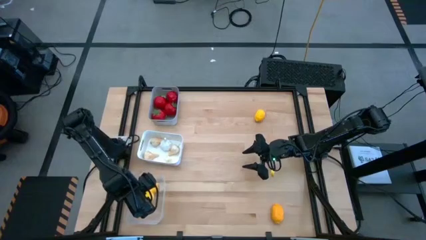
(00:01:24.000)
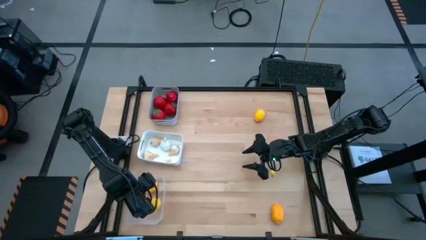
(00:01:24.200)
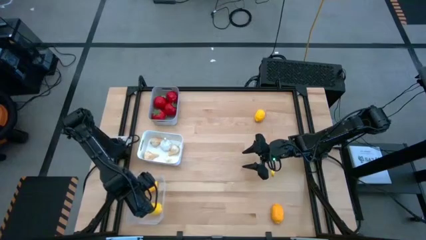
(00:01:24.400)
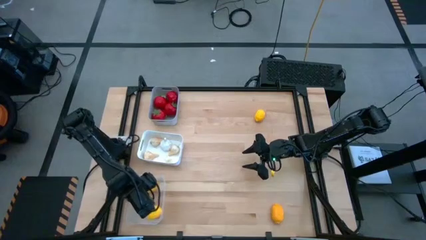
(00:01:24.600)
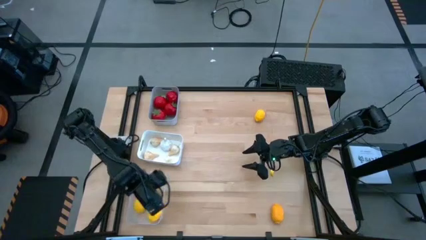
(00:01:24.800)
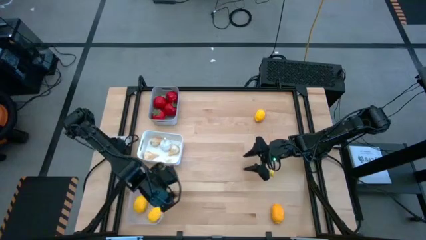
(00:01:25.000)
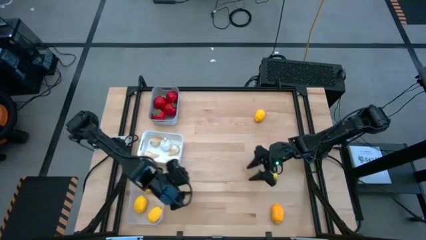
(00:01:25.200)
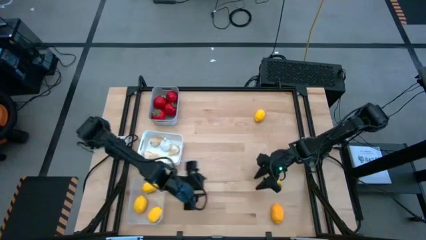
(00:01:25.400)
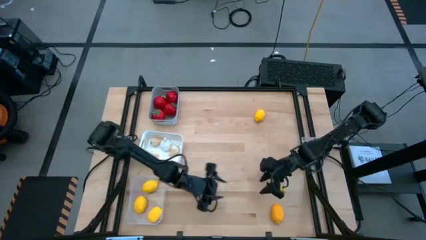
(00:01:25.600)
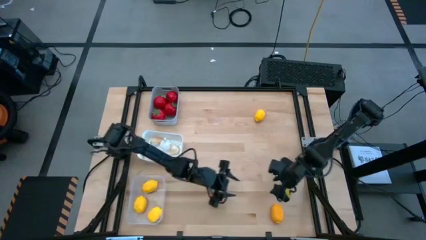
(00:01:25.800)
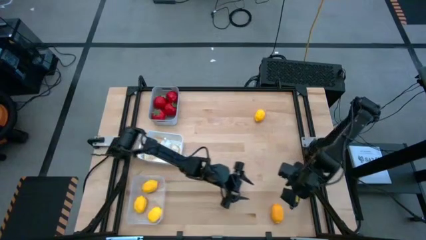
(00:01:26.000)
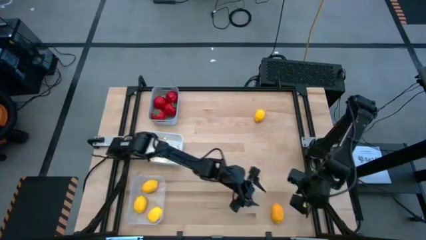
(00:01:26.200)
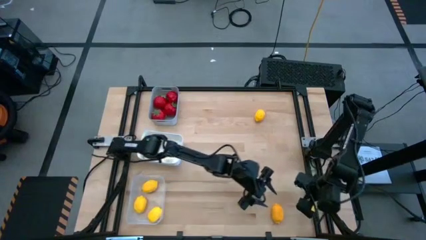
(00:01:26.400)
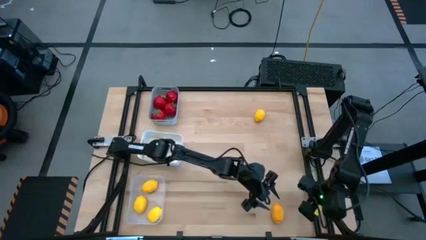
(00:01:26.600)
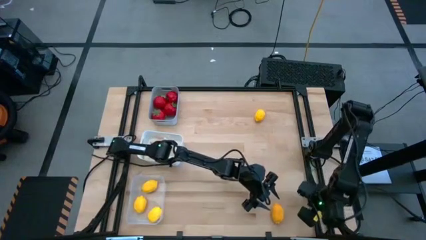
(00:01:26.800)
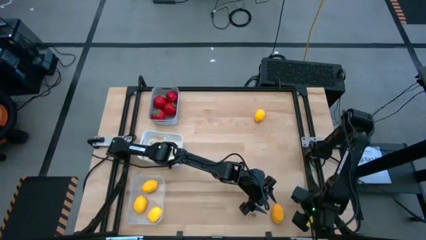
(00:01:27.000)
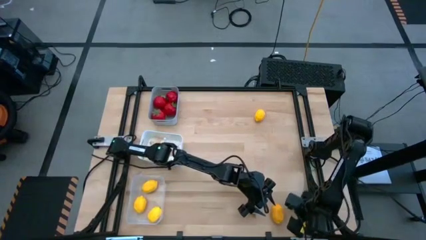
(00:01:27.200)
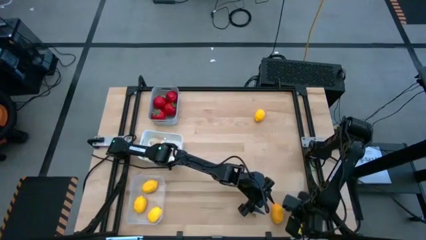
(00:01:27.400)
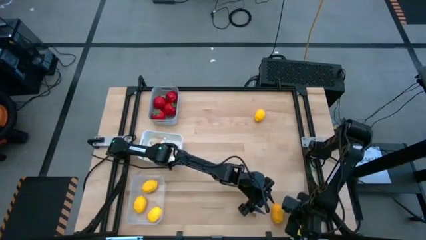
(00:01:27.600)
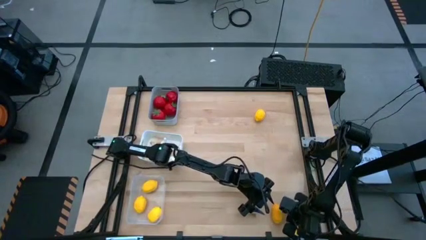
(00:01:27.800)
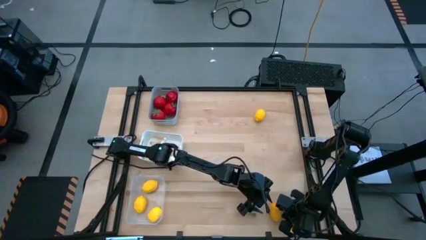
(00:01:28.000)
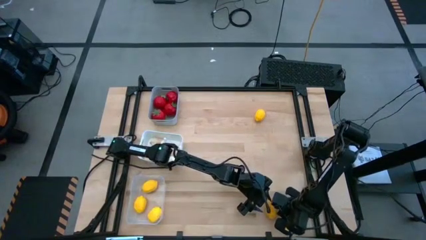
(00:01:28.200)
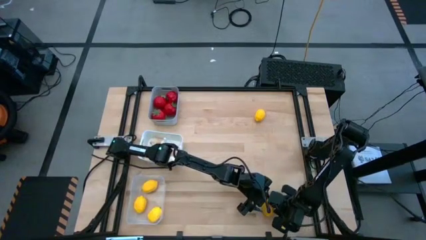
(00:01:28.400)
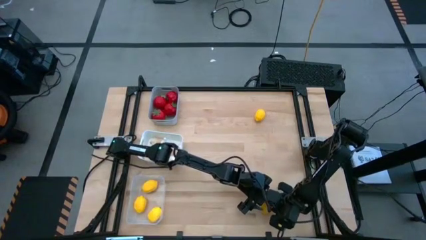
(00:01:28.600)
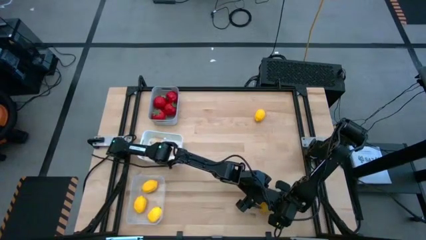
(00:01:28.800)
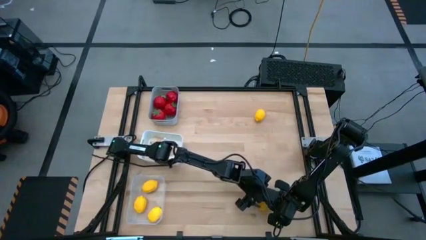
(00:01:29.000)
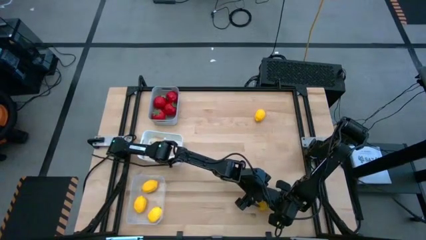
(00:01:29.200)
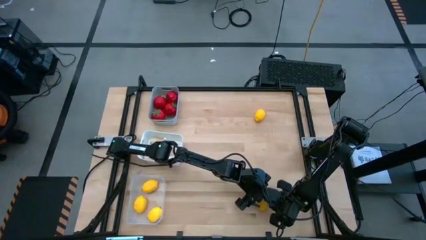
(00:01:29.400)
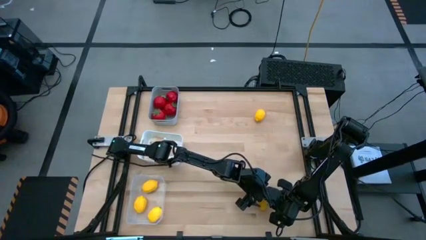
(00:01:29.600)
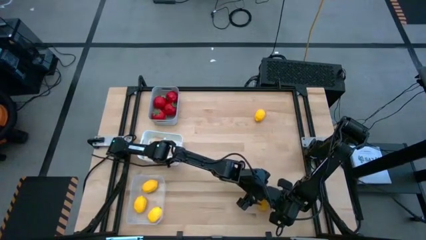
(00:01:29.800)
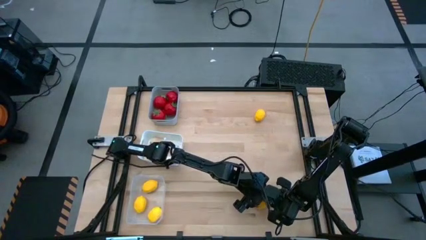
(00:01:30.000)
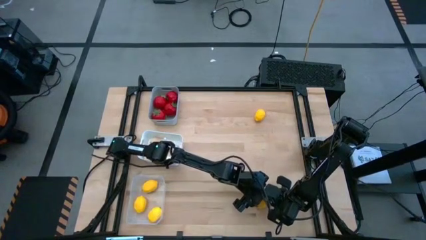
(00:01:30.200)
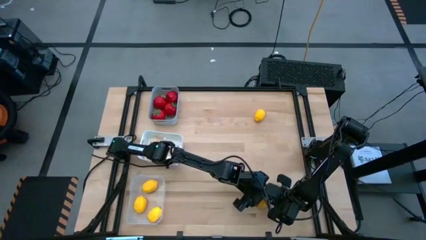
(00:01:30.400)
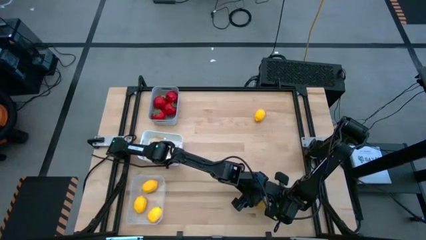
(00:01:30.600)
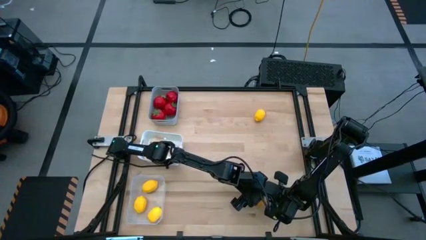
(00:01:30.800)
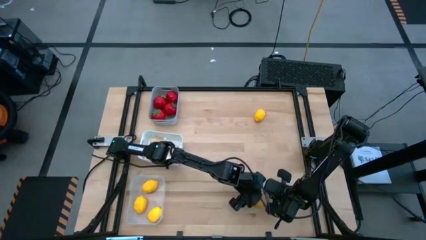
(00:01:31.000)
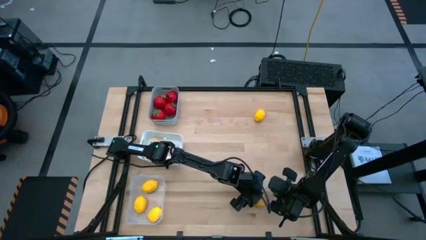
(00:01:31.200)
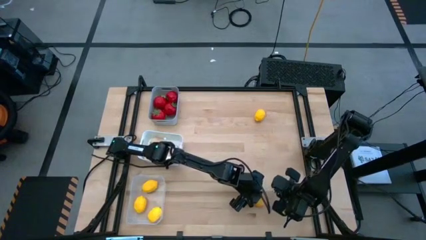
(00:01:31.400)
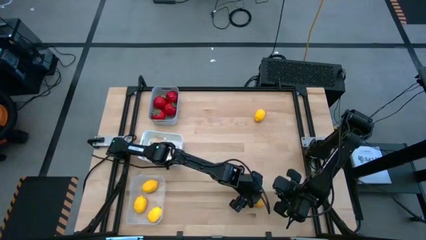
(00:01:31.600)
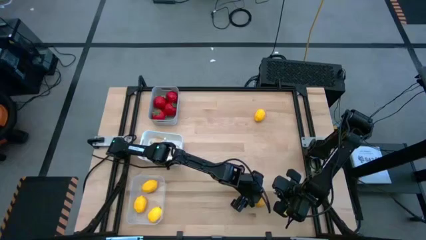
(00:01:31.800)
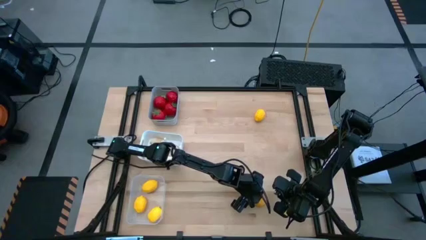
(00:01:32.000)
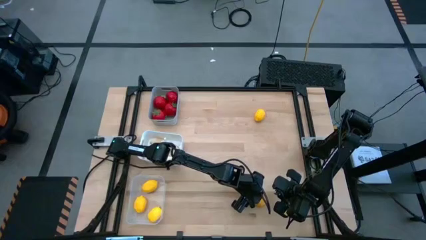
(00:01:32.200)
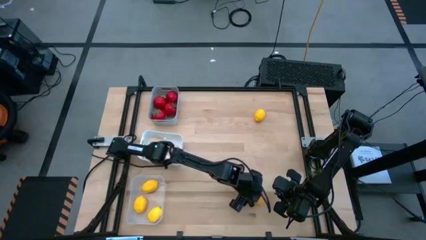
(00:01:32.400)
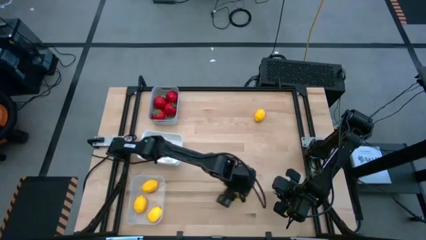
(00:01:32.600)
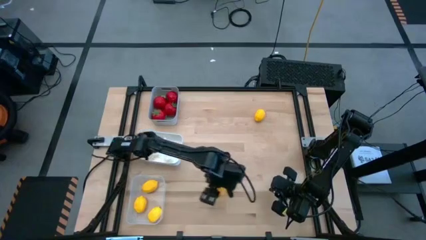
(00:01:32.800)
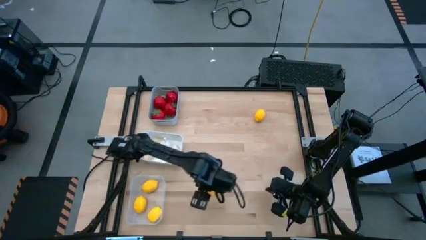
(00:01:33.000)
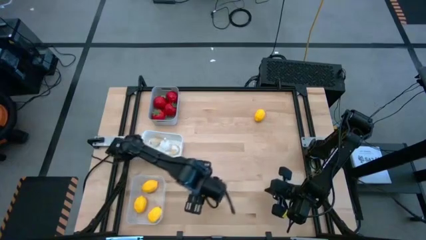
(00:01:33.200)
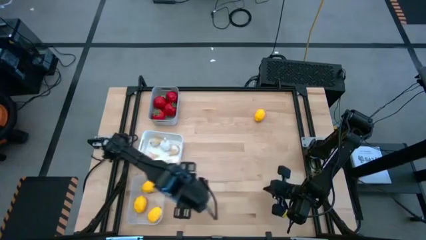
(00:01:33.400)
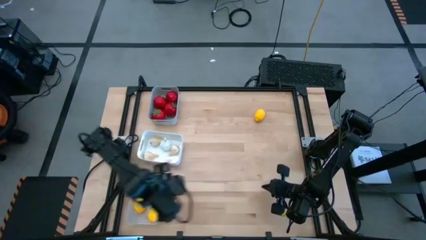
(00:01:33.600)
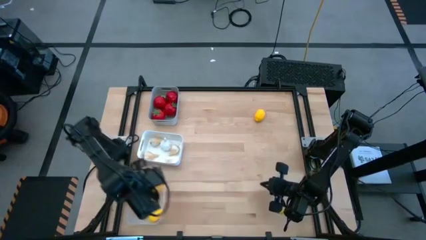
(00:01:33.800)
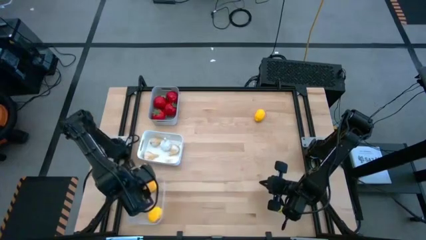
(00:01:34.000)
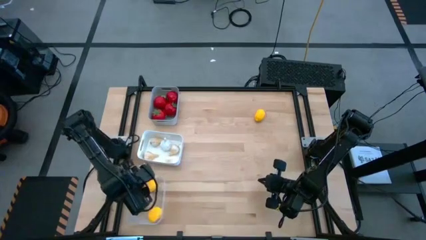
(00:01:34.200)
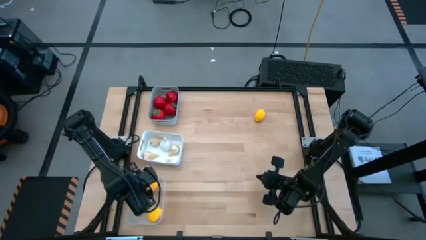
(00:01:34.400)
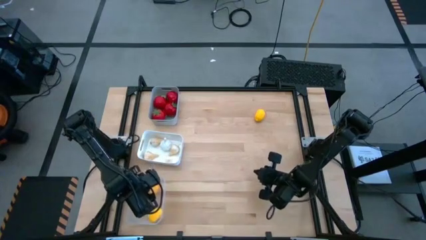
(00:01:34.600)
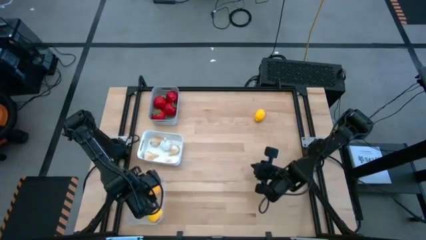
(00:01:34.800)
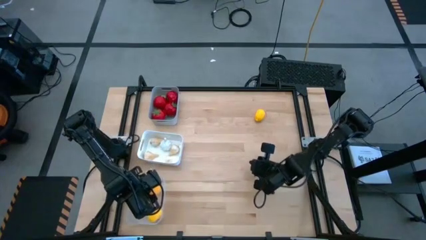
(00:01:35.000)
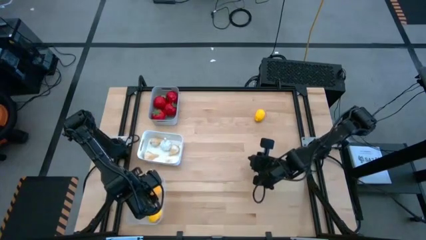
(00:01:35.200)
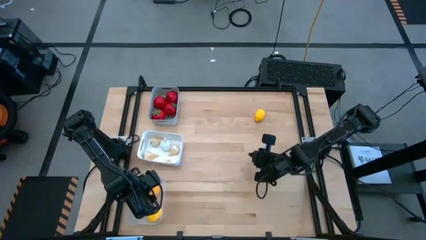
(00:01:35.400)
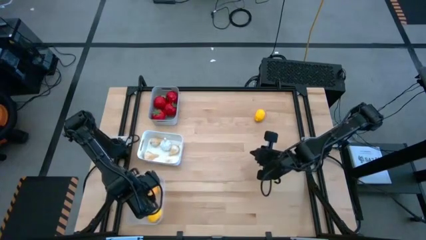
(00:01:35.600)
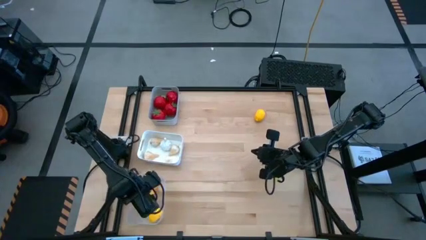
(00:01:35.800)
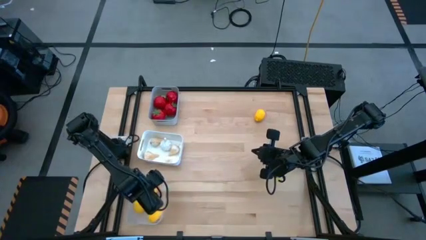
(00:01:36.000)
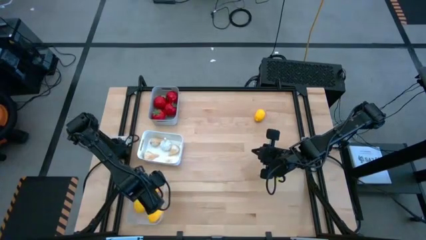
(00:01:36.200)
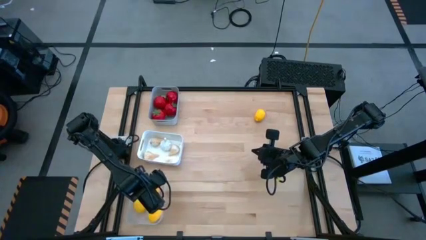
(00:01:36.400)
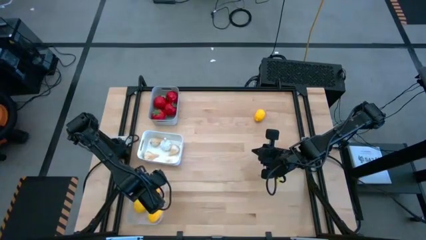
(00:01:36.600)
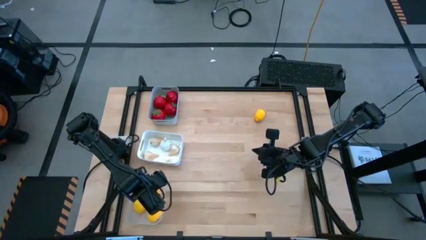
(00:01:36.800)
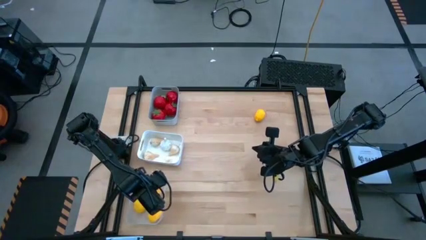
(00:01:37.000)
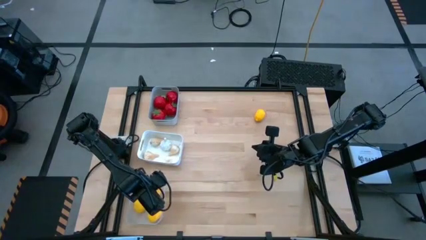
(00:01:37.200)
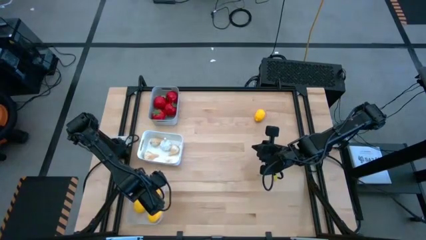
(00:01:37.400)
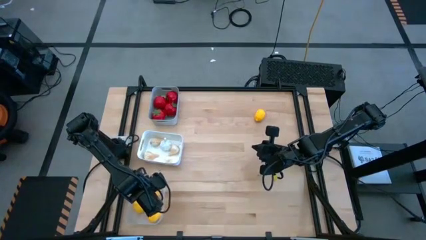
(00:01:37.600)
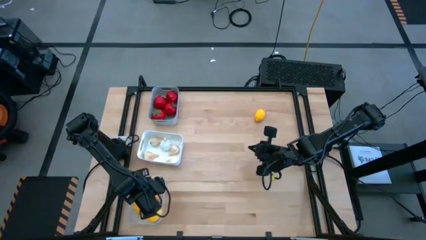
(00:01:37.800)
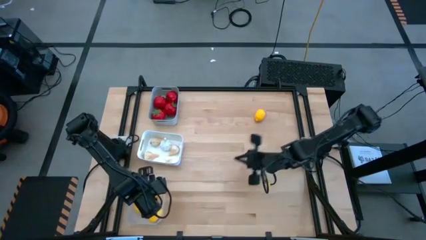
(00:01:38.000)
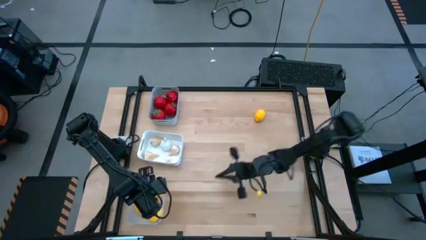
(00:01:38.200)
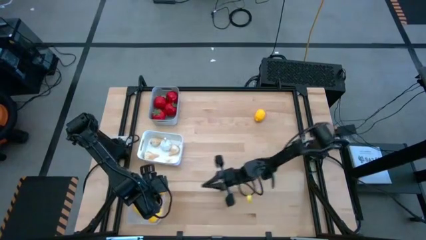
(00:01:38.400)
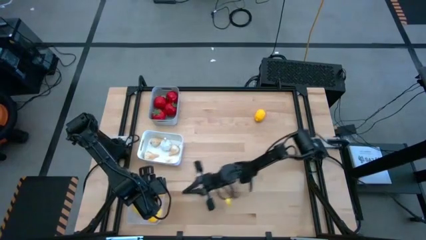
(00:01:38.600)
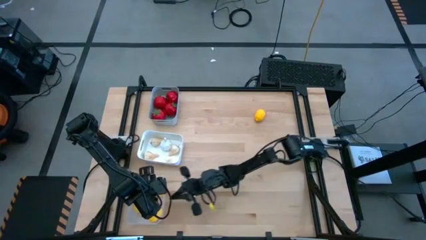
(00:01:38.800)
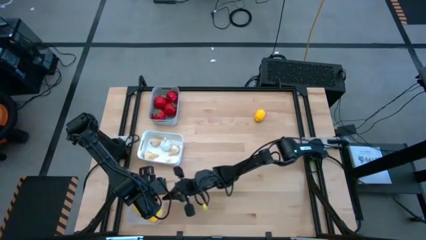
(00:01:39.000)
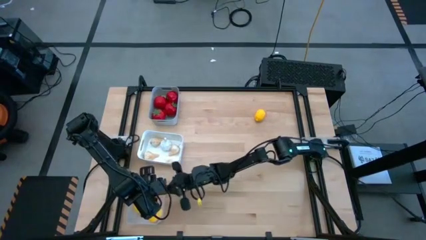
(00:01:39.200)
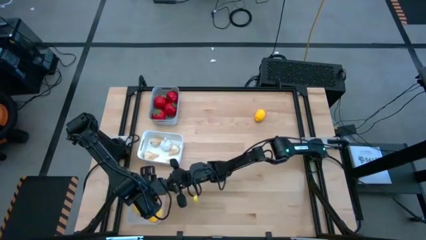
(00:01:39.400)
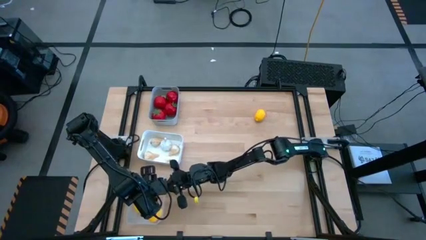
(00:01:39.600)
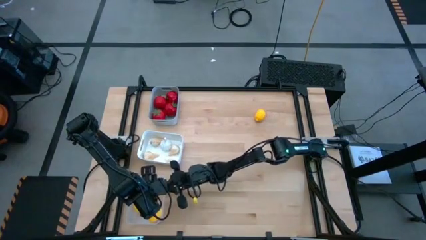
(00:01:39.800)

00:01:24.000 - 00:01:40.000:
Task: Sort produce into baskets
Put the yellow lemon into the transparent bin

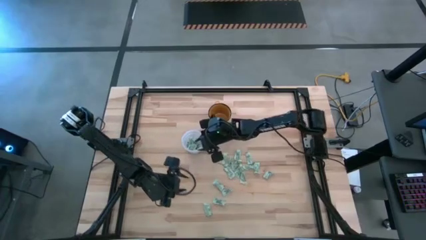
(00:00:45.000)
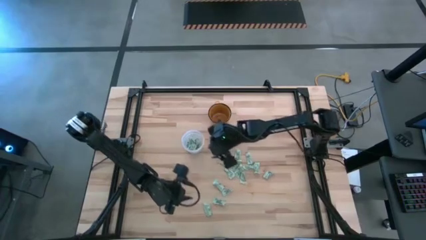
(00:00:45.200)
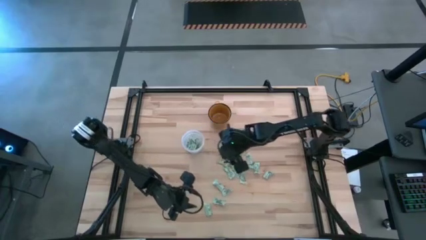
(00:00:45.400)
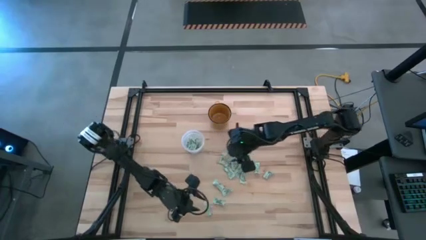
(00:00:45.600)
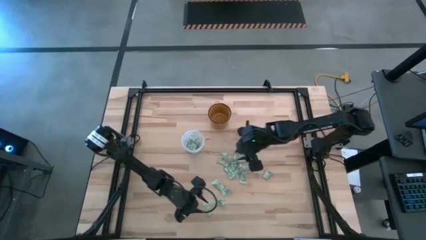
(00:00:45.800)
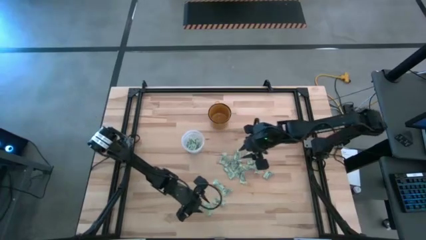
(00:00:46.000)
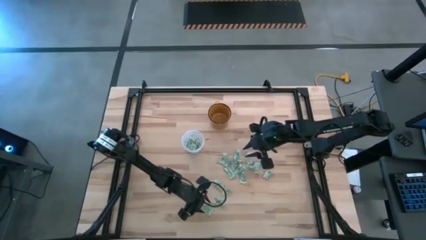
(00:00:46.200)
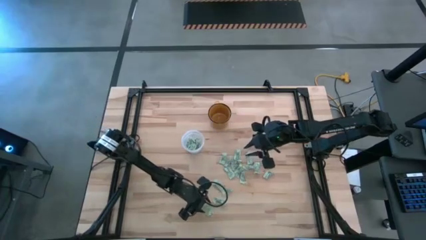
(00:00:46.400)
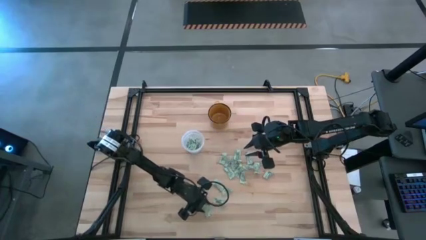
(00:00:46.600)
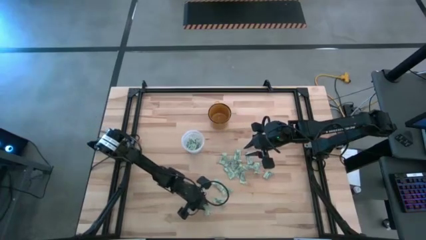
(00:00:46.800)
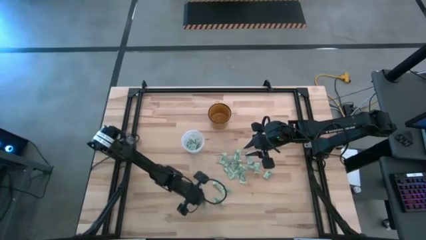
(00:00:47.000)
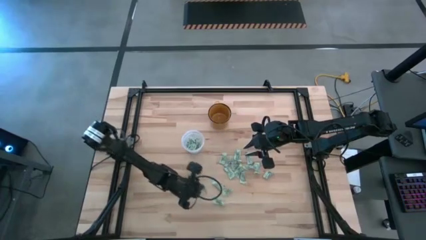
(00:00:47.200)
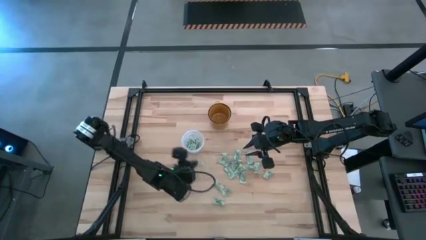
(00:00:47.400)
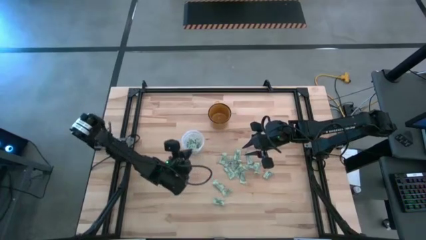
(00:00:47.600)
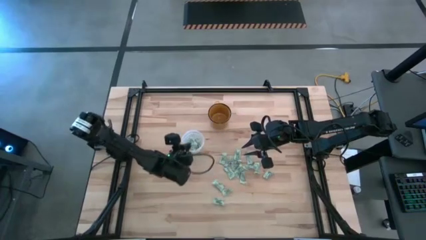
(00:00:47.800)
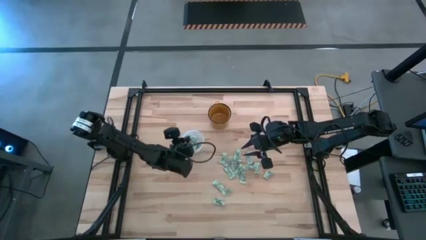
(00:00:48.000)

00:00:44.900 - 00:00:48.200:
Task: Pick and place Stevia / Truvia into bins
Put the stevia packet into the transparent bin
